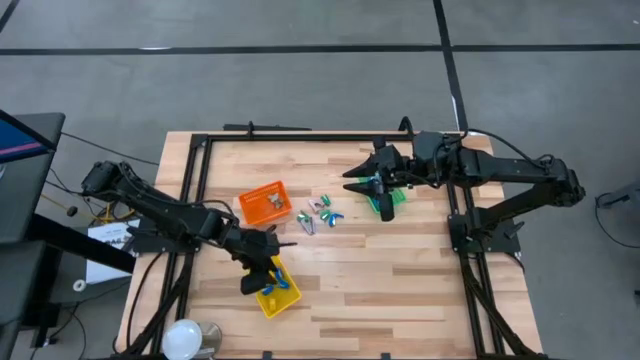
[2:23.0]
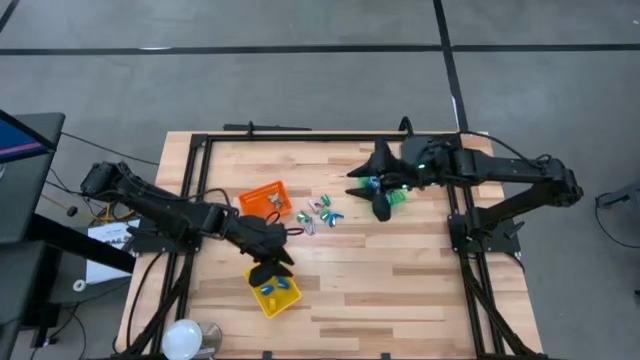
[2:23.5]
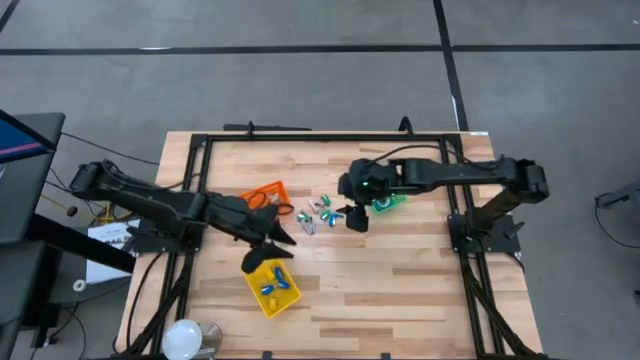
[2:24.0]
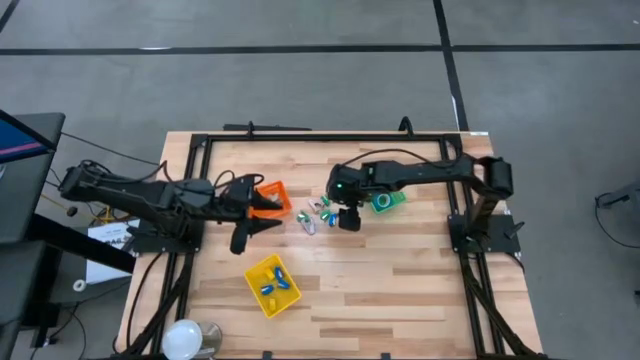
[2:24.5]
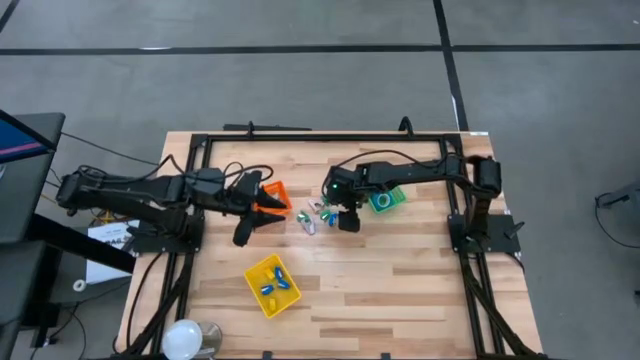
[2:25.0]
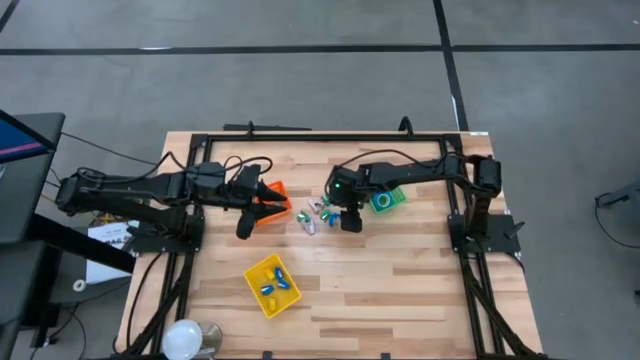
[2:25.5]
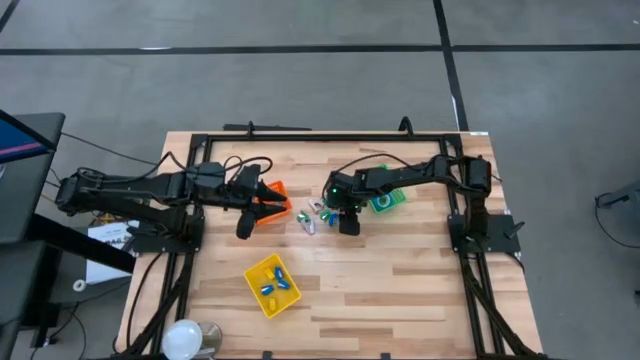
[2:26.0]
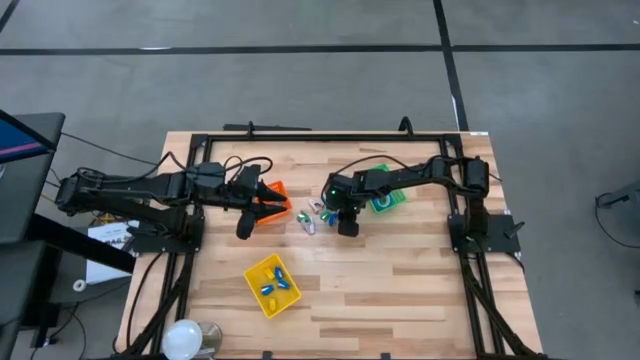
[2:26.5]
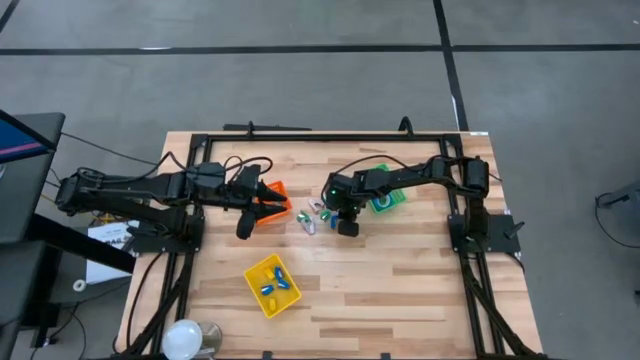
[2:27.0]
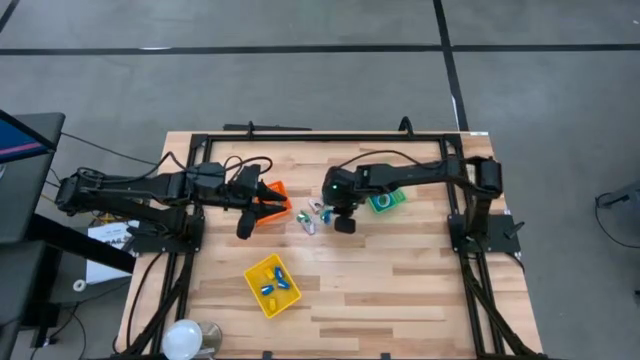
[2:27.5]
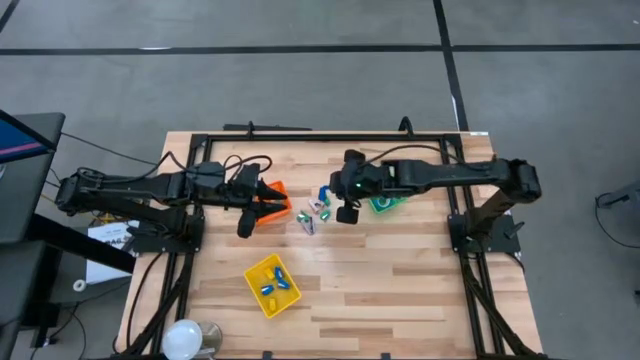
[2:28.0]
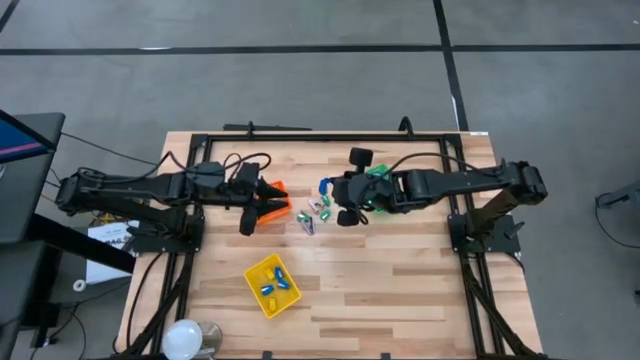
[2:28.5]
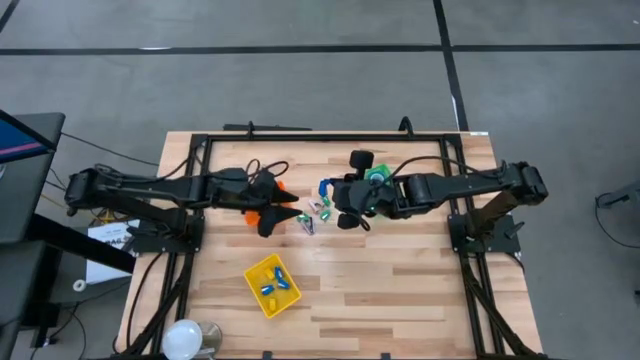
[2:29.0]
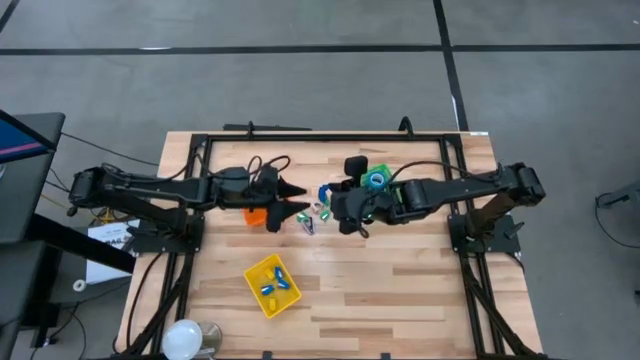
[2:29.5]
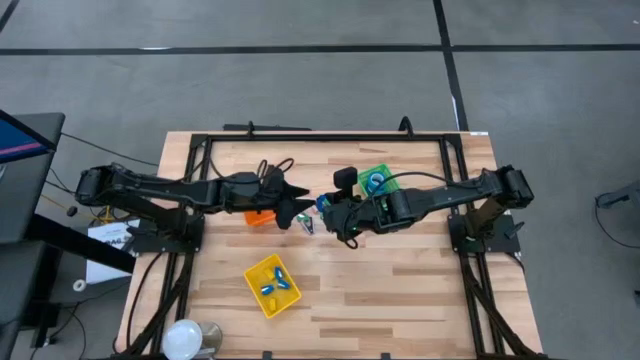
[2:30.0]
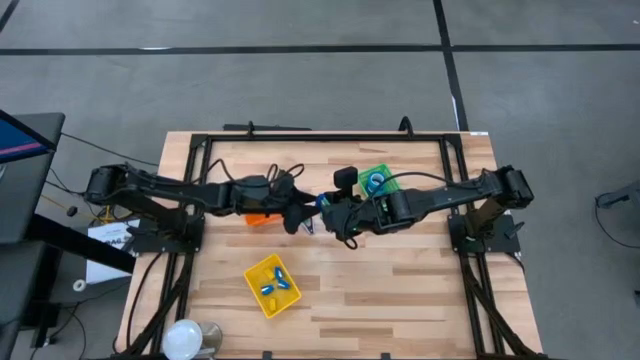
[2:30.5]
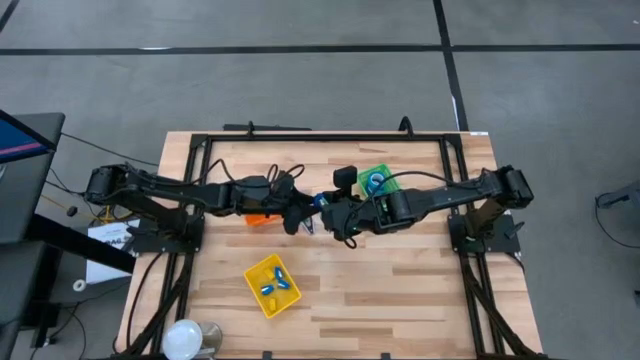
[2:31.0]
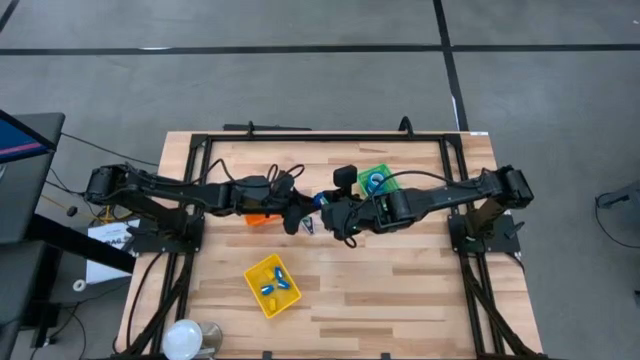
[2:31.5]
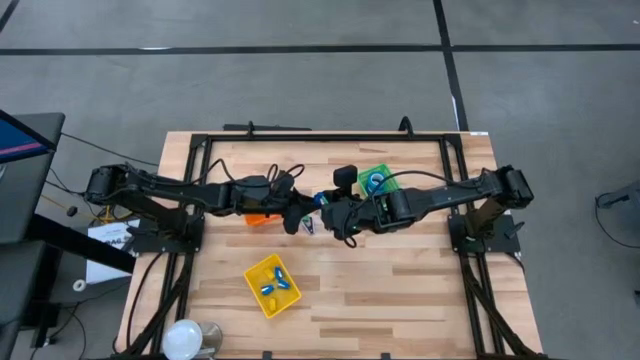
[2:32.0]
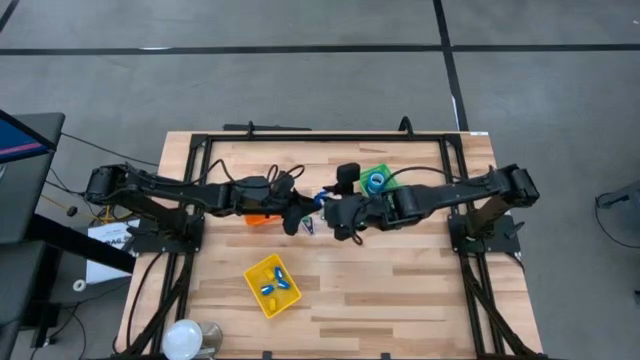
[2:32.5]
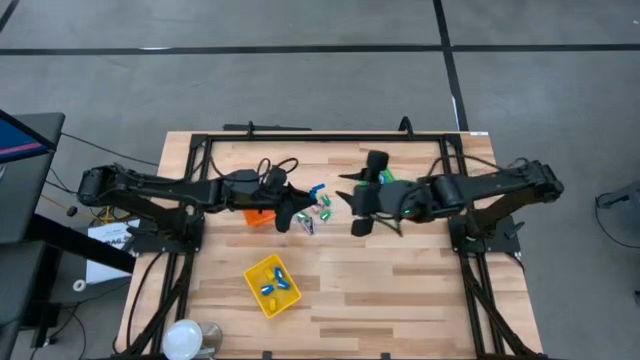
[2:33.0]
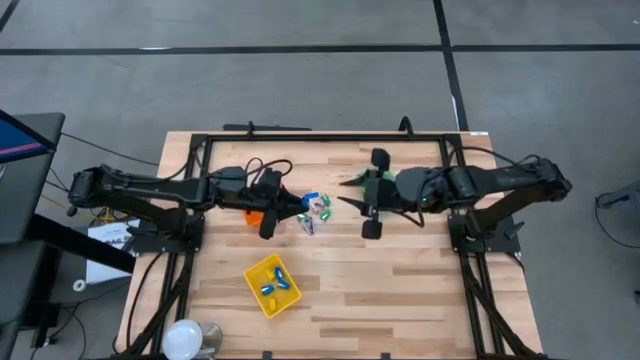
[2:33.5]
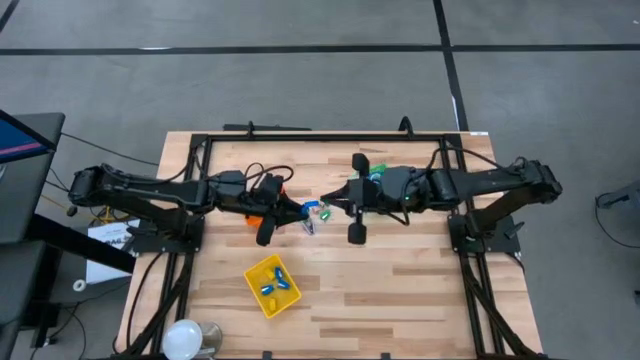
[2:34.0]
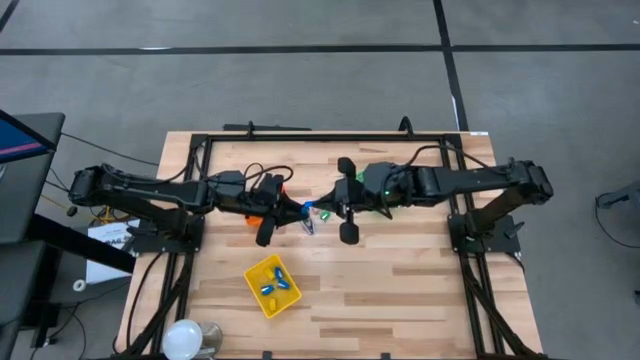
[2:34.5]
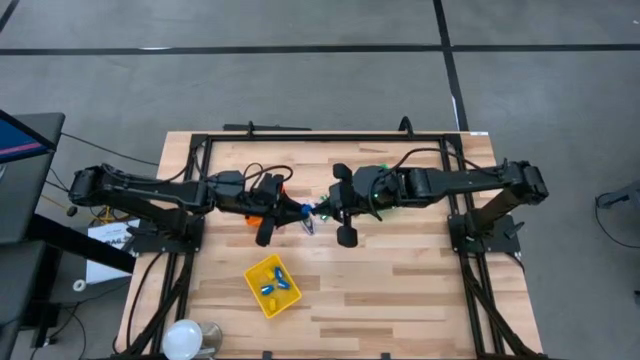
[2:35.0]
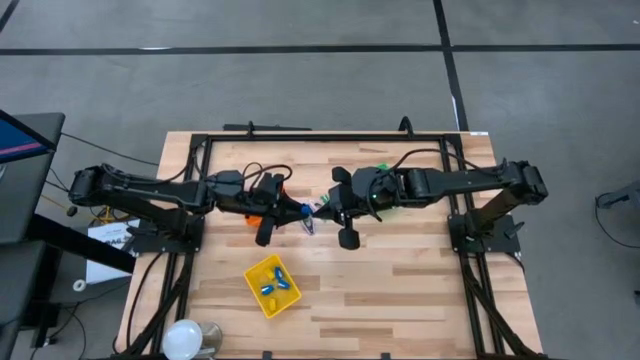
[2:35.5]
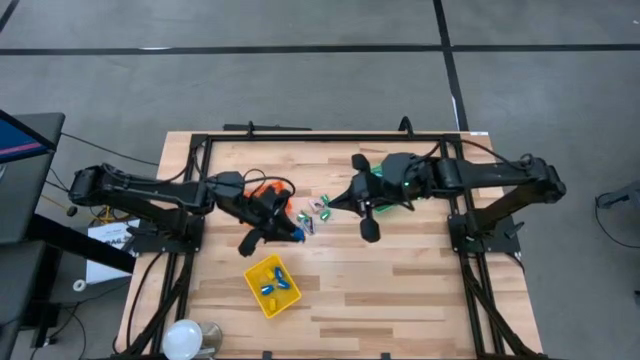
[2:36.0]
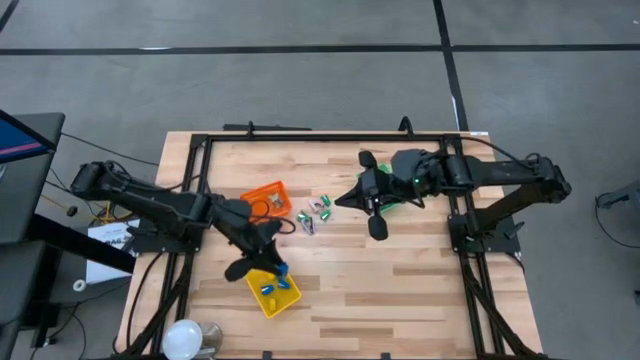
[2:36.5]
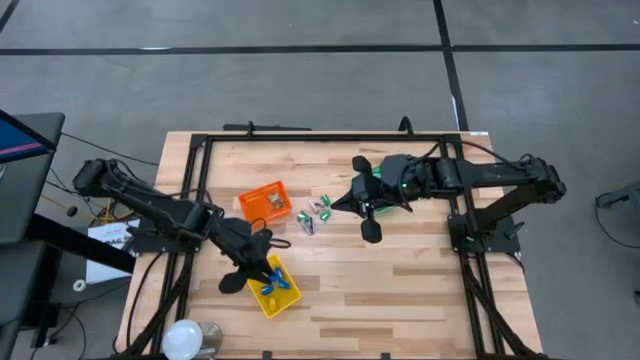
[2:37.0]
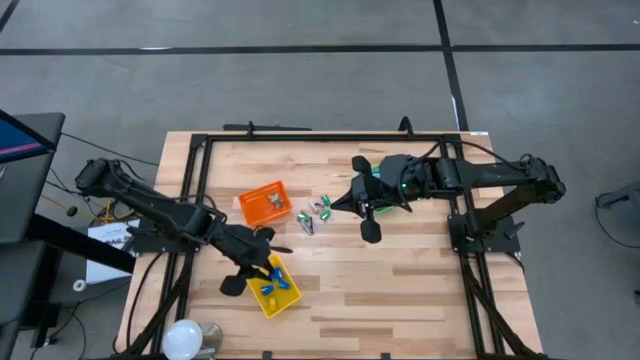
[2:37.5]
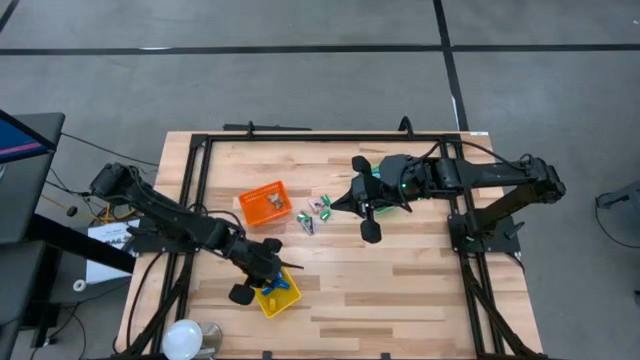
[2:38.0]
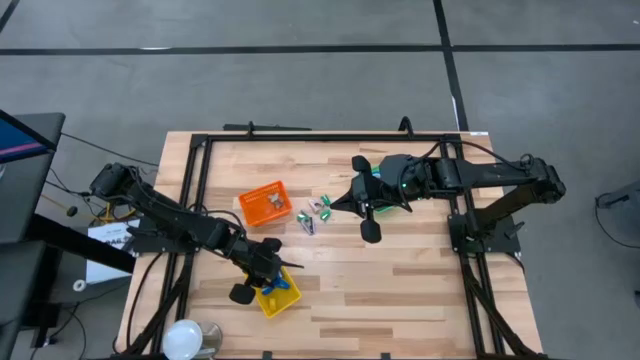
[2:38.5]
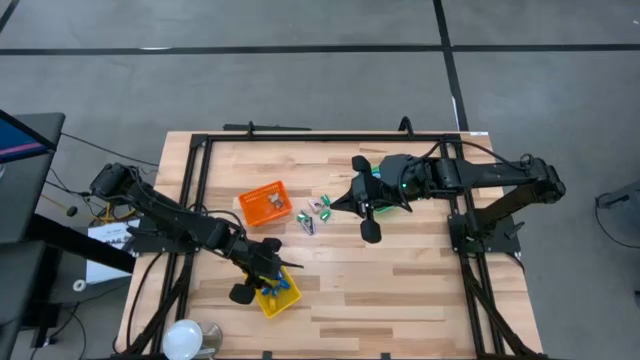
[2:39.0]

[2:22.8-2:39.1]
Task: Pick and place Stapler, Stapler remover, tape
Put the blue stapler into the yellow basket

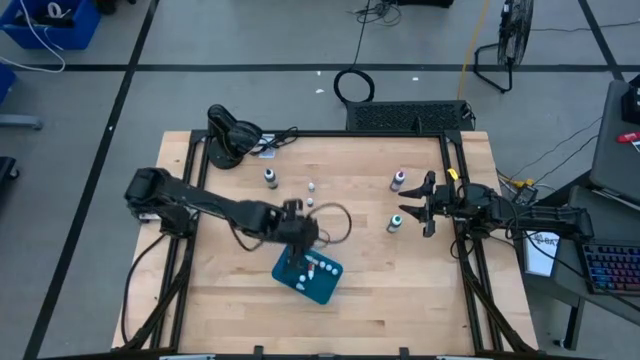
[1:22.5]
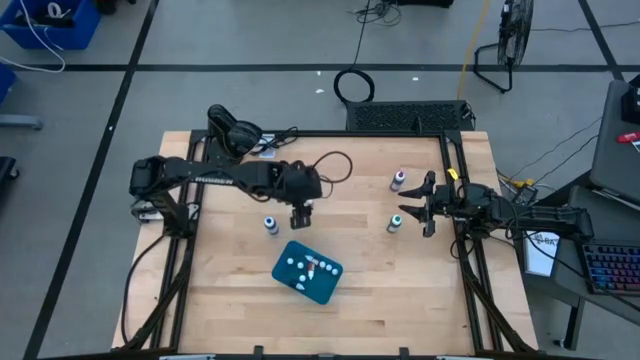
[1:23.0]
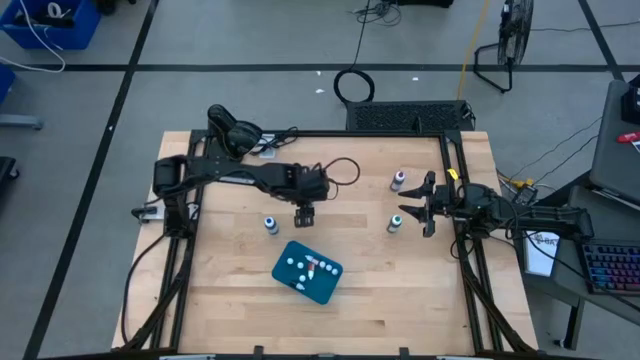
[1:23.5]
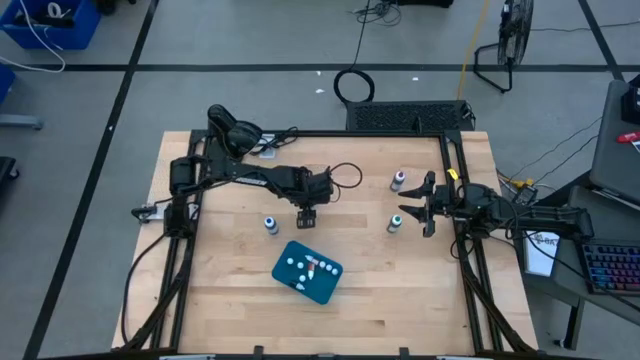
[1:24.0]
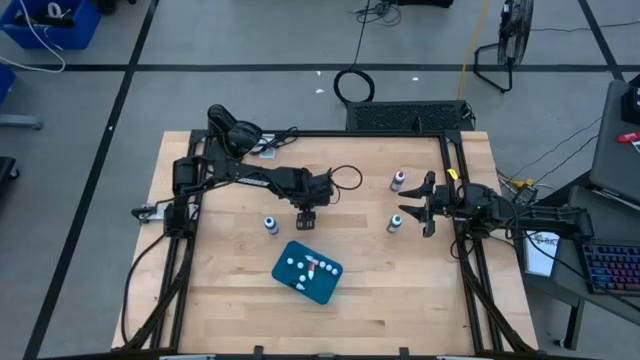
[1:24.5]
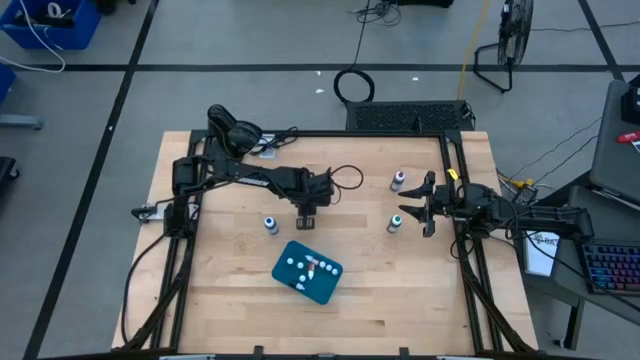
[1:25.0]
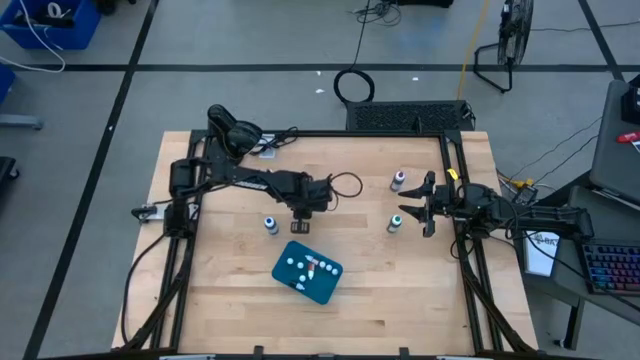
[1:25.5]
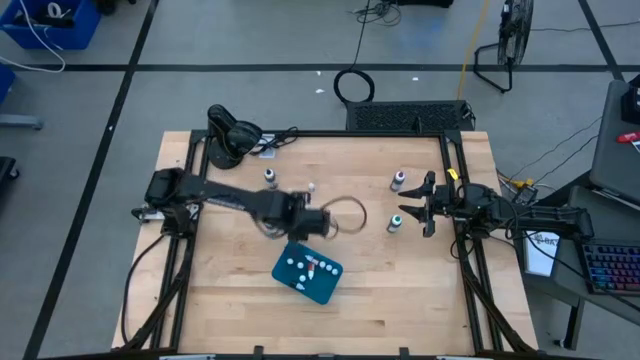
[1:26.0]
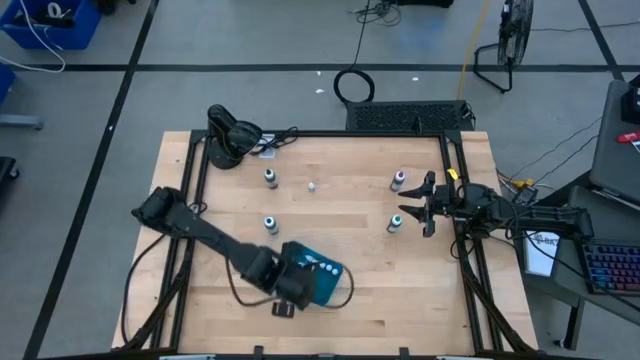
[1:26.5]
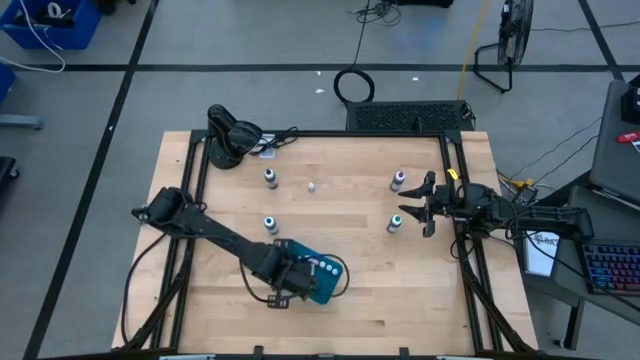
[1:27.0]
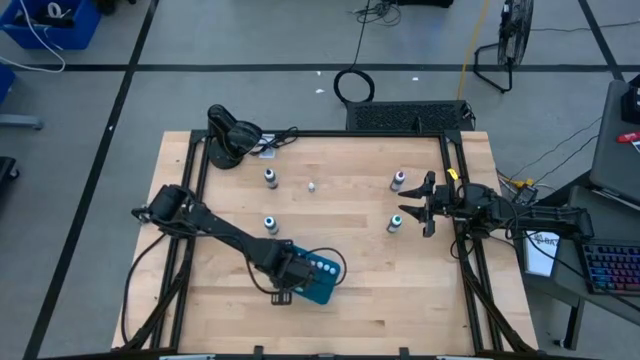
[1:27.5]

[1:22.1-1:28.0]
Task: Pick & Place food coloring
Put the small purple coloring bottle into the blue bin

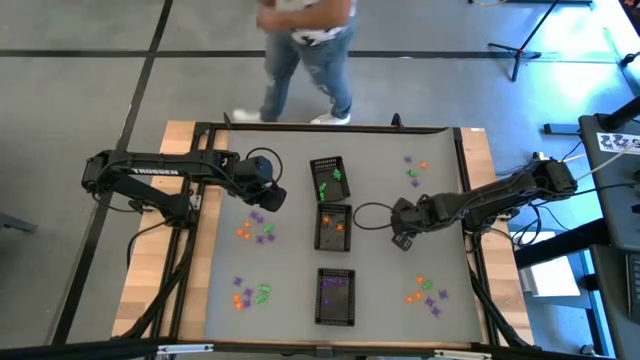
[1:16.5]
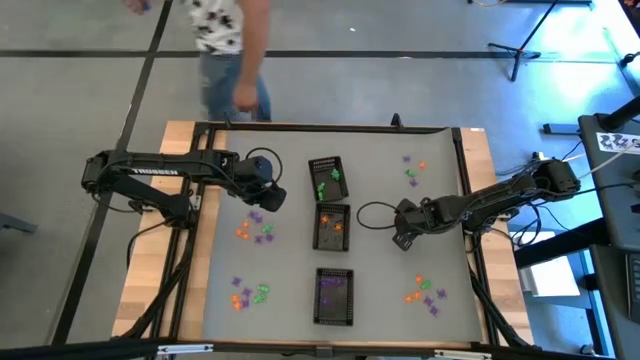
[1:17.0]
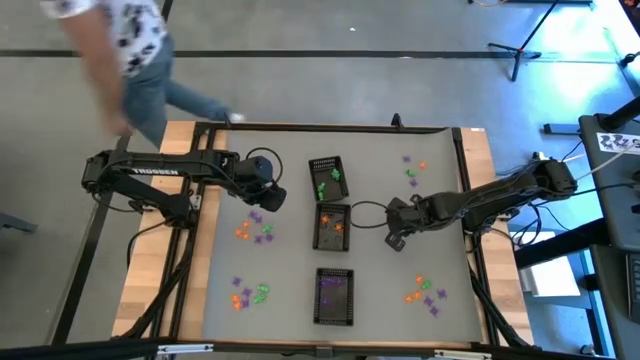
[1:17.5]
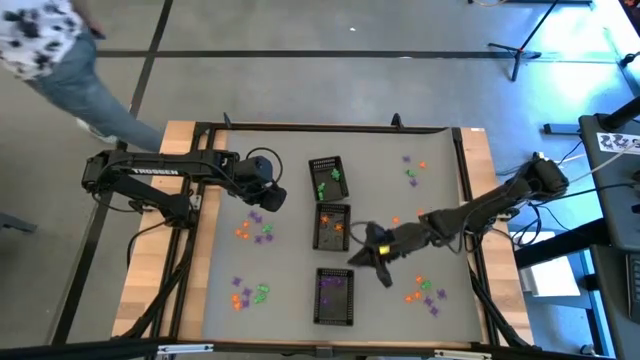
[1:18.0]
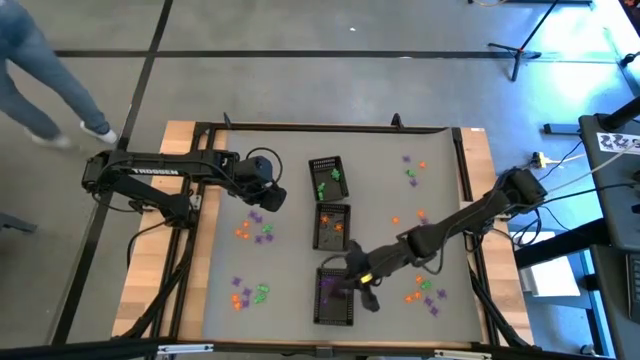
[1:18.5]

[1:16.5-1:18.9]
Task: Sort Halloween decoration
Put the violet spider toy into the bottom black bin
